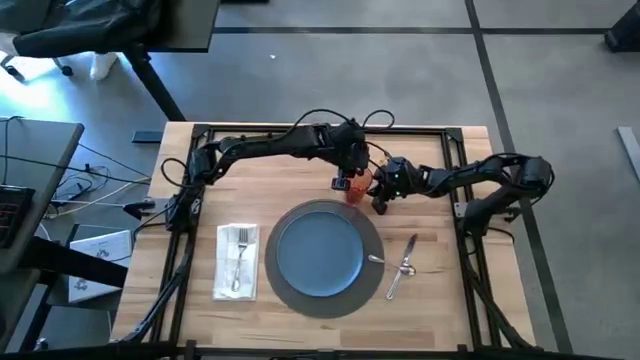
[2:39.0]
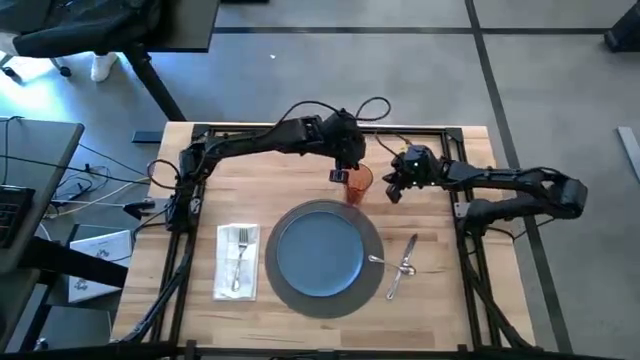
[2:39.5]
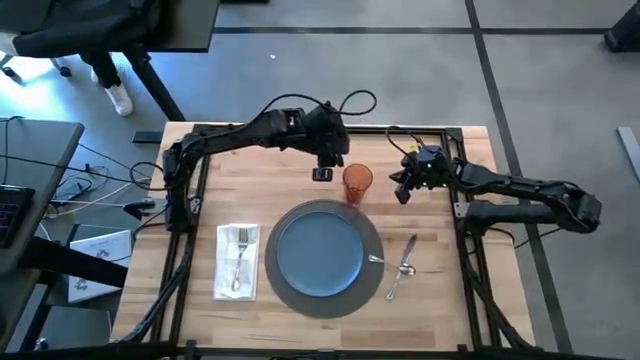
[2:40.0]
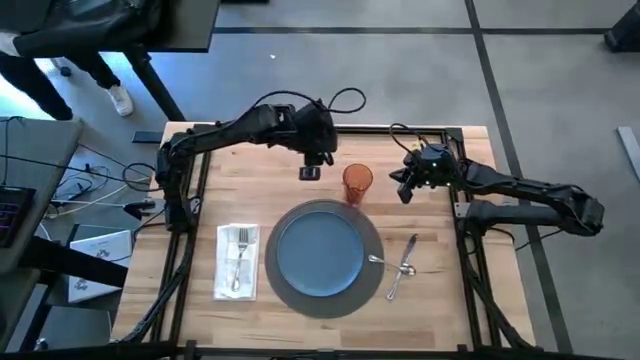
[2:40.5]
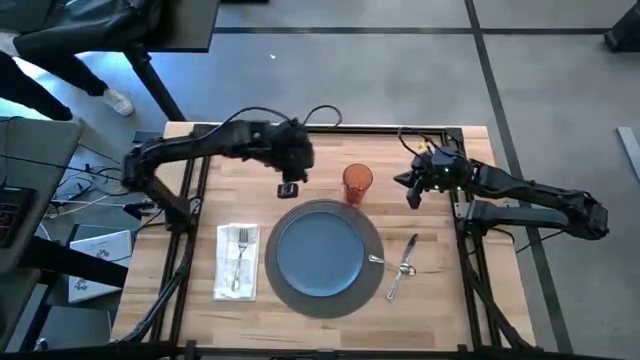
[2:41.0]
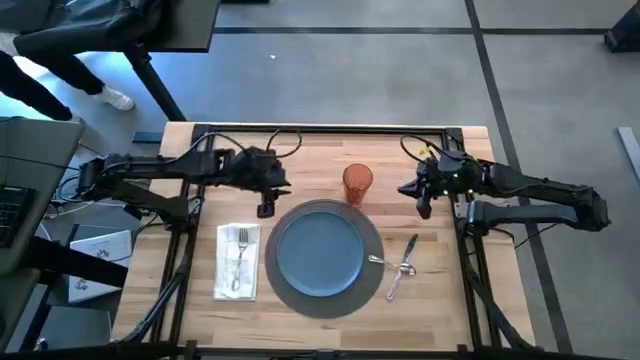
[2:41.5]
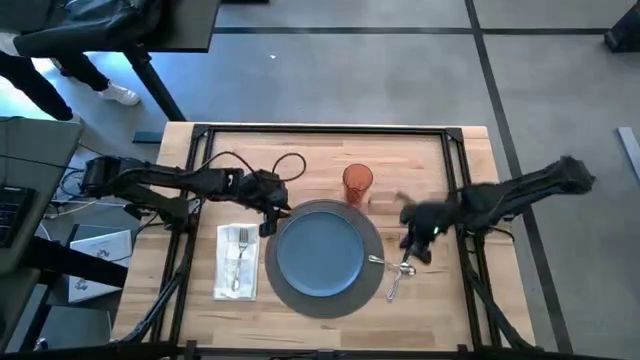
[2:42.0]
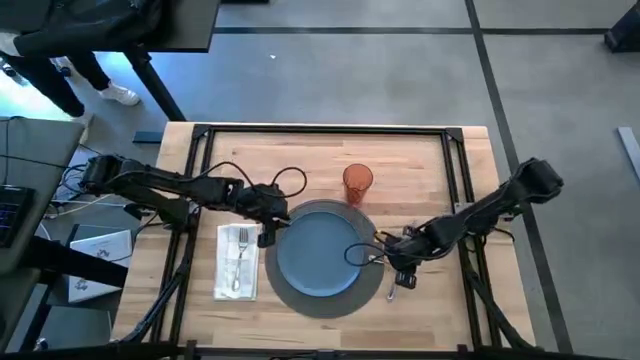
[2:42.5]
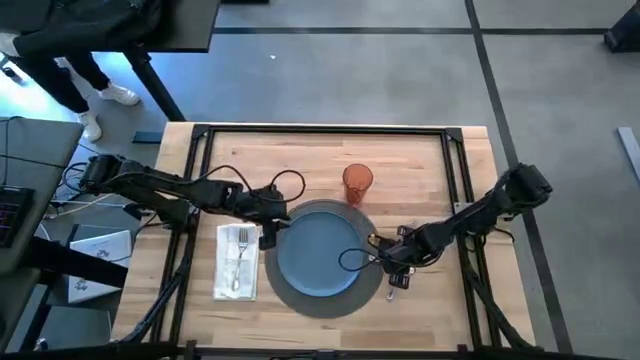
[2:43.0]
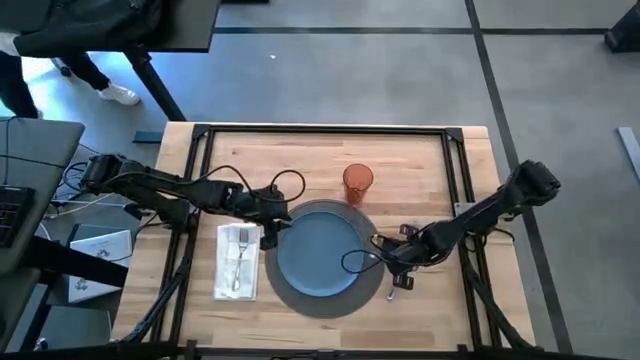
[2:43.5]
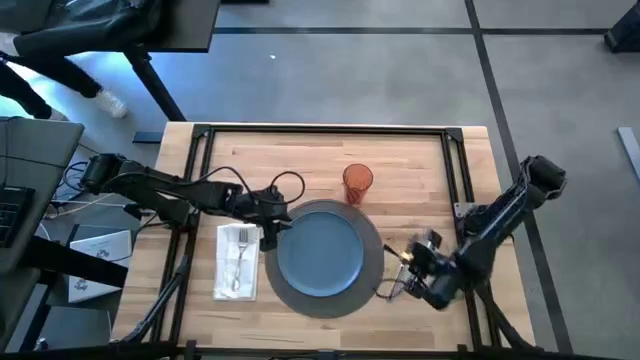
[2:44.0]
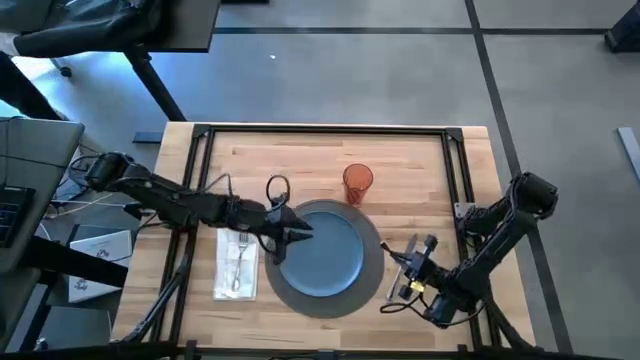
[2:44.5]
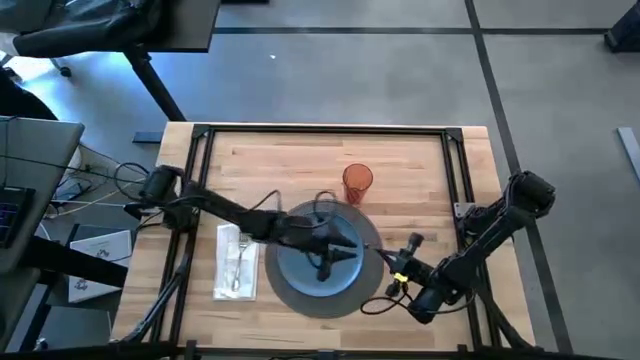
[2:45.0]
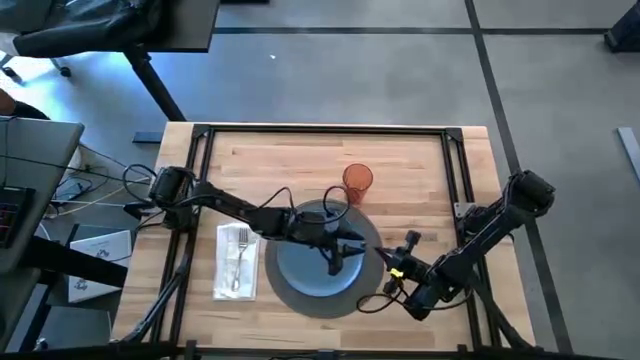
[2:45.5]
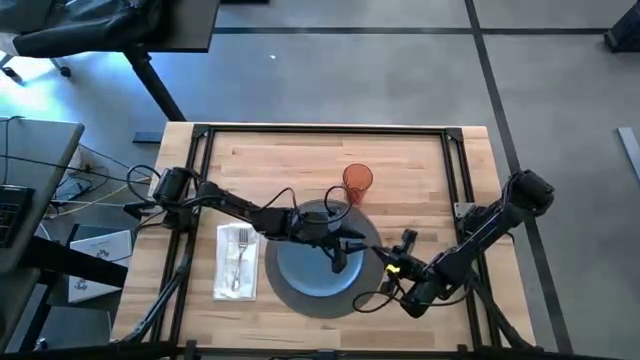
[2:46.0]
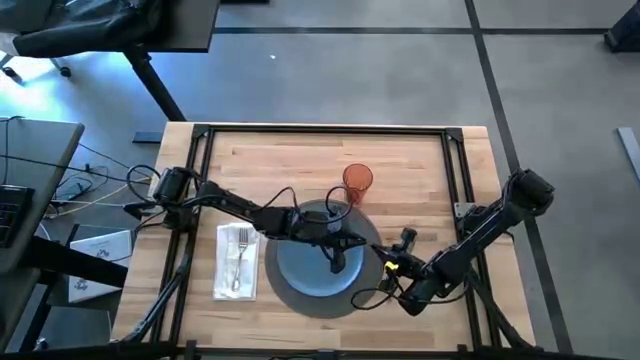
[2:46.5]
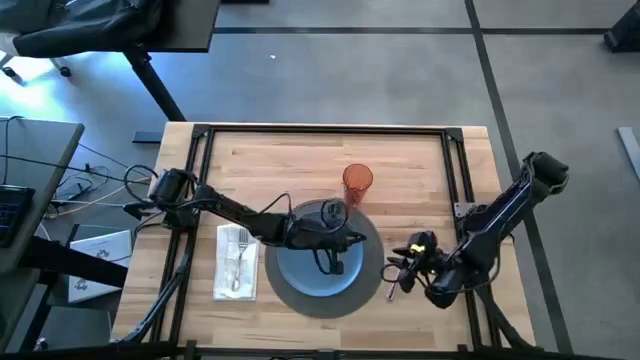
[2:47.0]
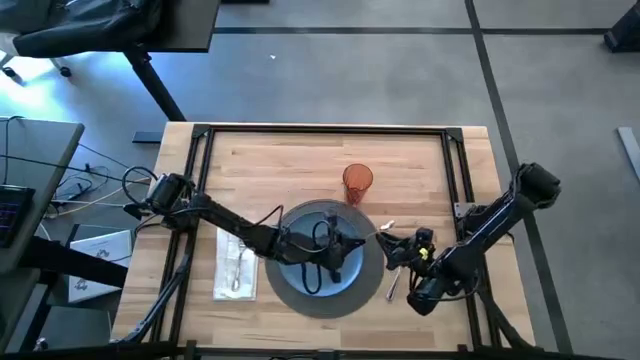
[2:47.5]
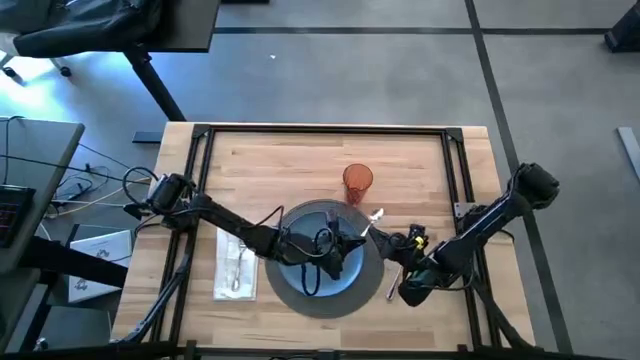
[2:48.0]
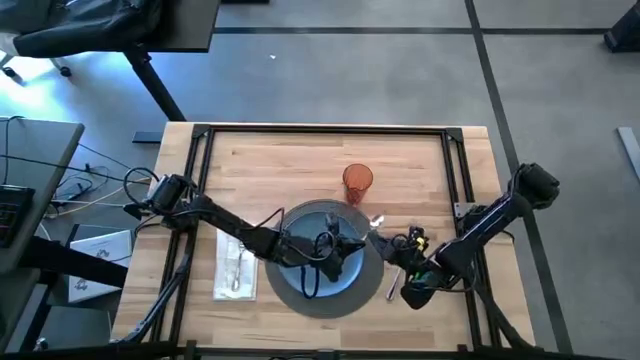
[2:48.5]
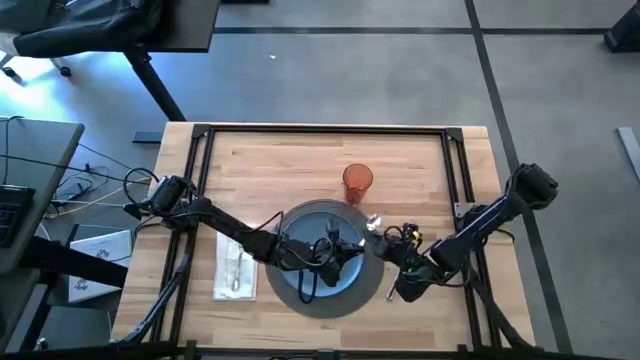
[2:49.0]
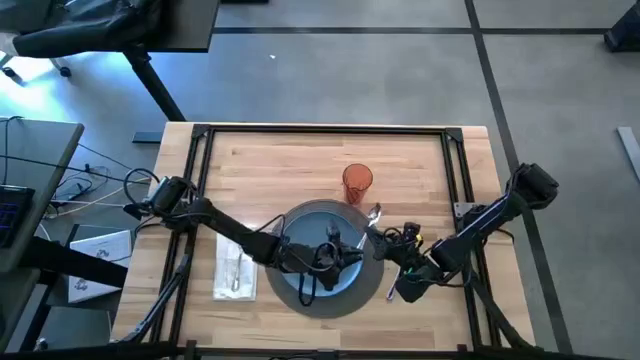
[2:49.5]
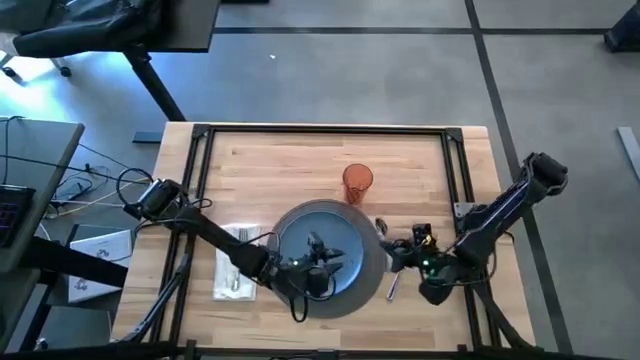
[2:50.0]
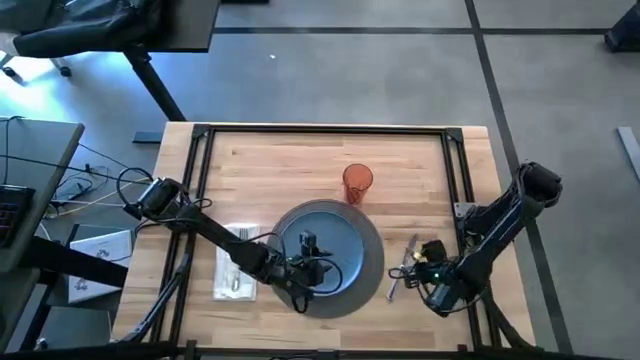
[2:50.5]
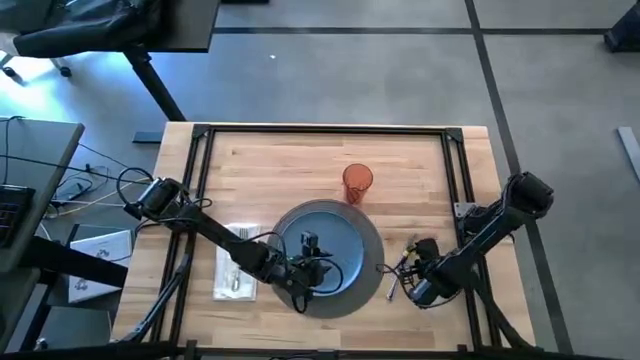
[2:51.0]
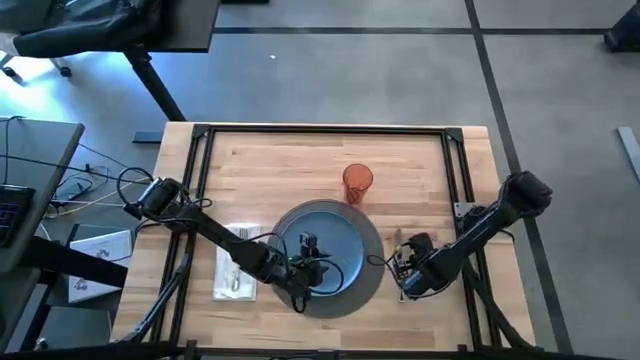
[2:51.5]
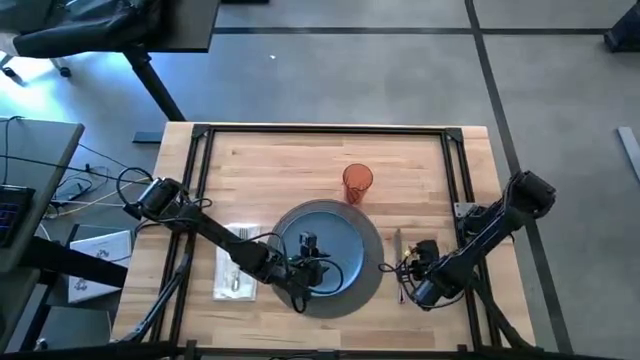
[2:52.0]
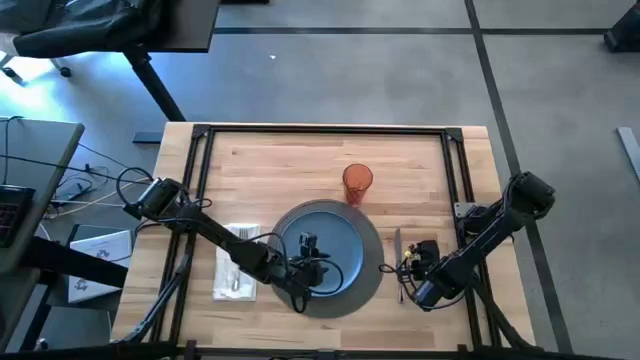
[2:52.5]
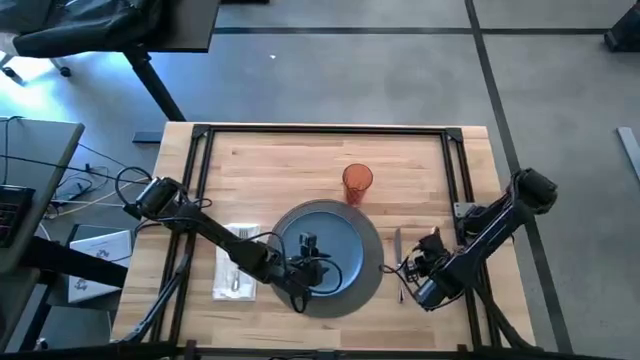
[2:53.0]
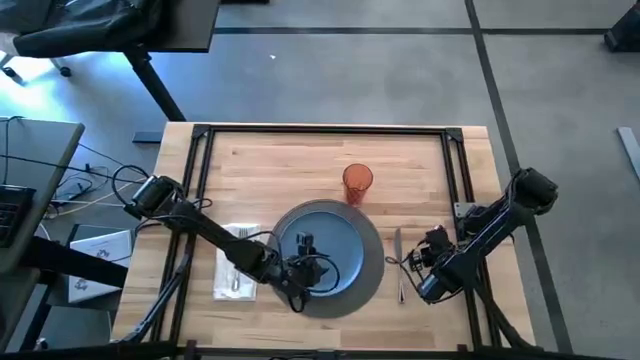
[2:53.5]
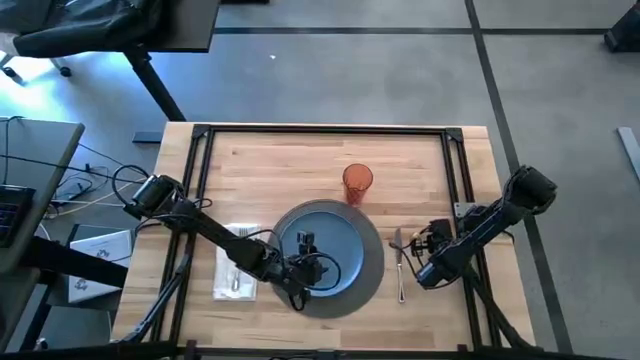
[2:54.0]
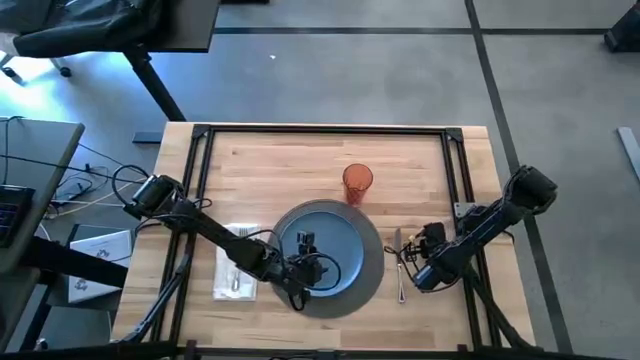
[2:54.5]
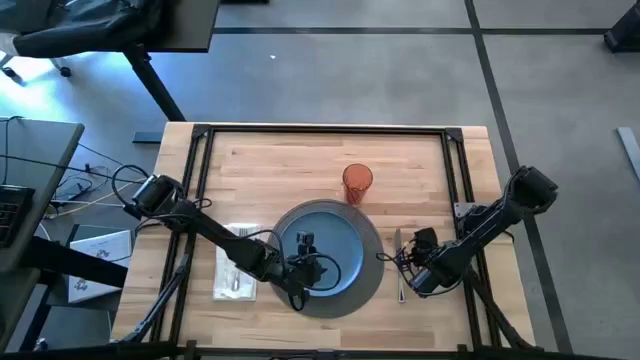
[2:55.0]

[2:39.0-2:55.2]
Task: Set table place
Adjust the silver spoon

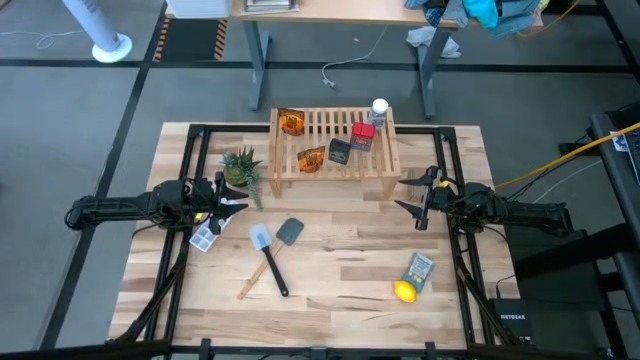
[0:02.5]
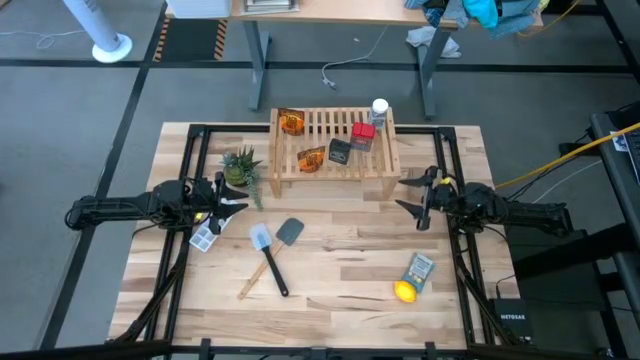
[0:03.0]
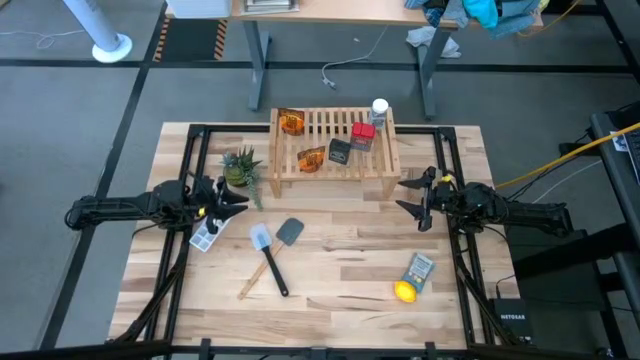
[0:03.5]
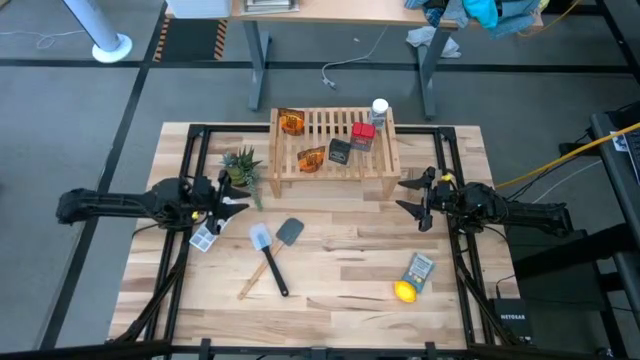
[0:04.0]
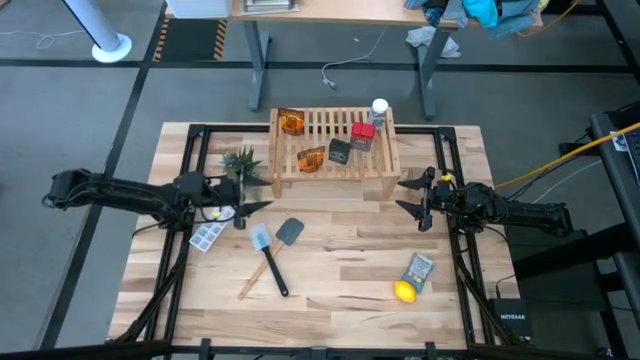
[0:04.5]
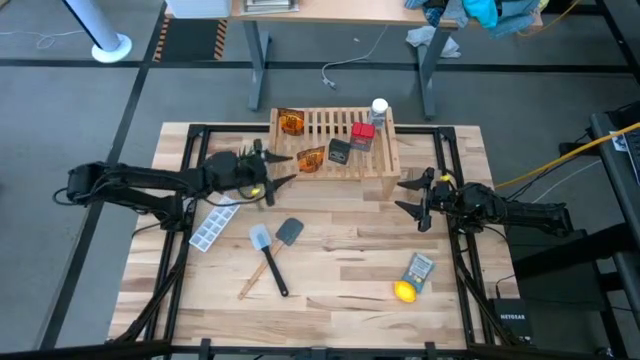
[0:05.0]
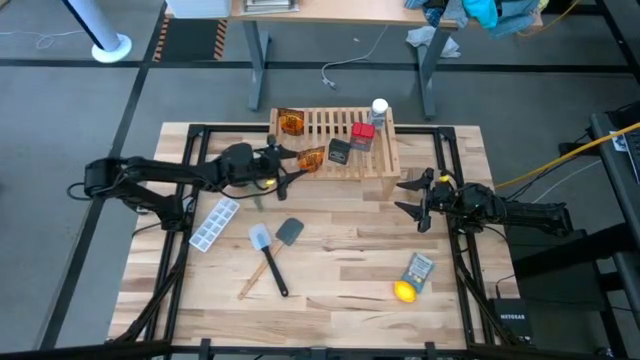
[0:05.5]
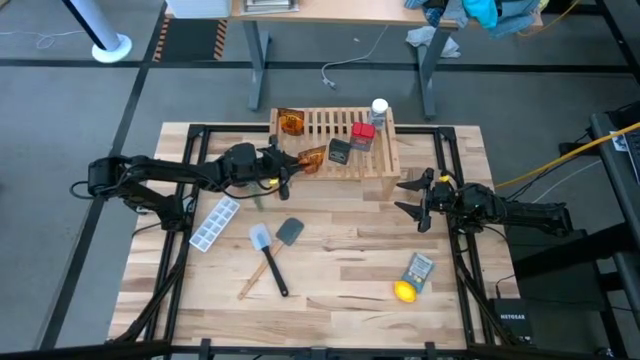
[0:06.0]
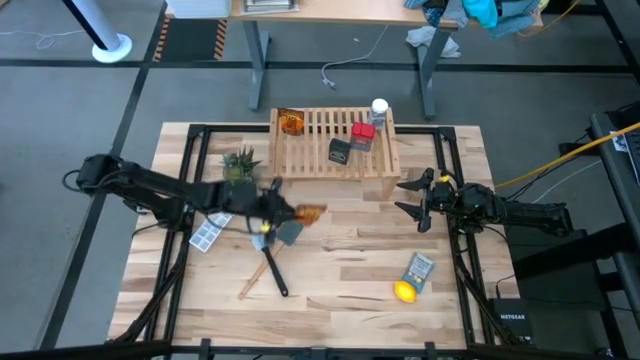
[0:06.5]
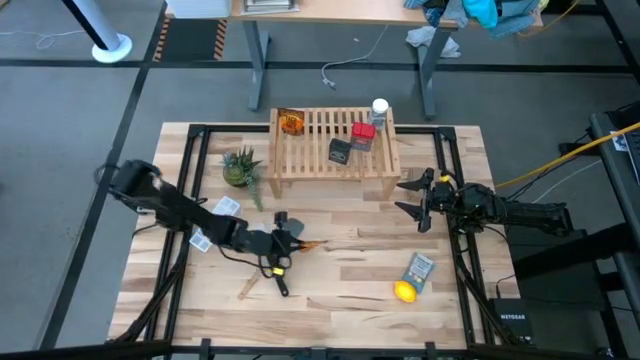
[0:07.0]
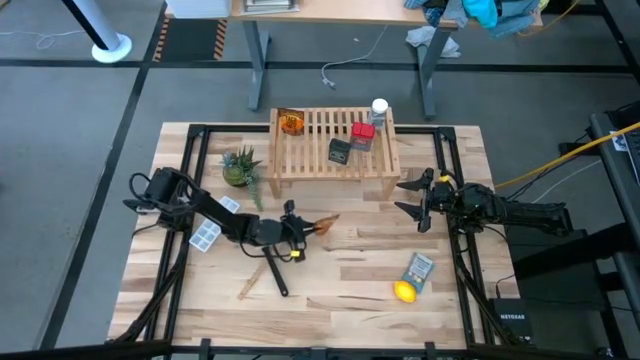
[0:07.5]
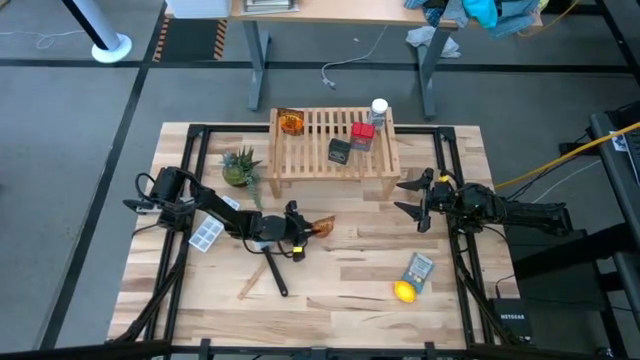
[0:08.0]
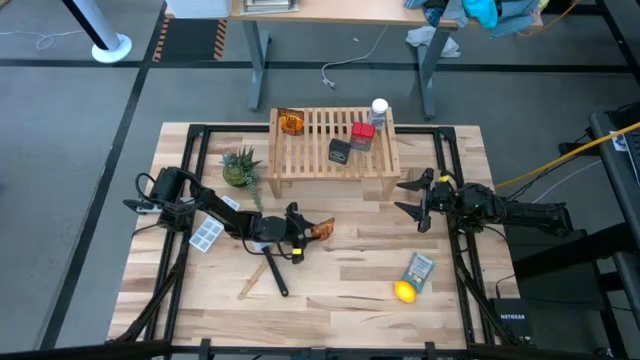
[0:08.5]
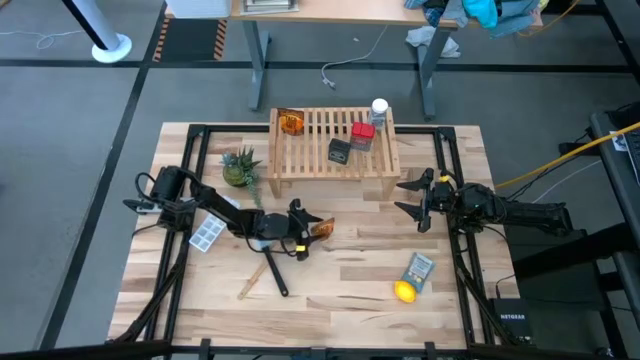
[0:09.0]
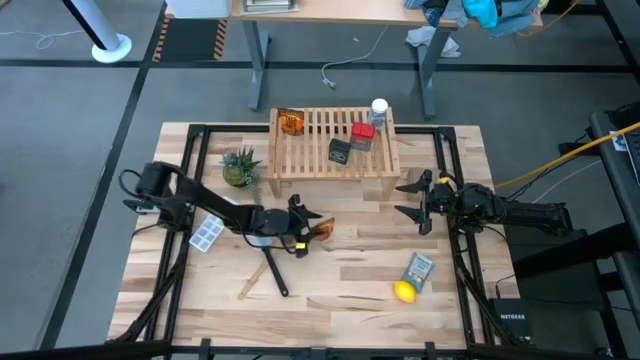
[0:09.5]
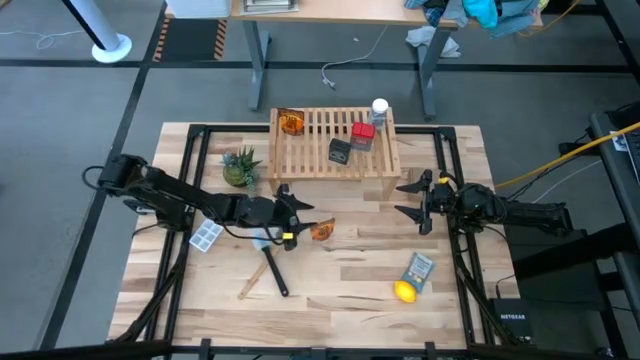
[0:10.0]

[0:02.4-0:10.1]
Task: Shelf spices
Remove the orange seasoning pack from the shelf
